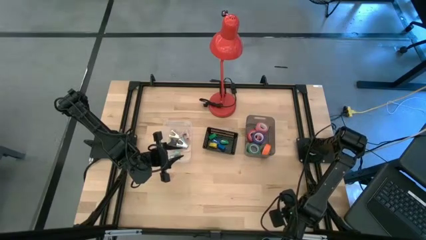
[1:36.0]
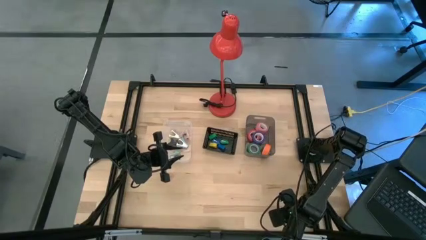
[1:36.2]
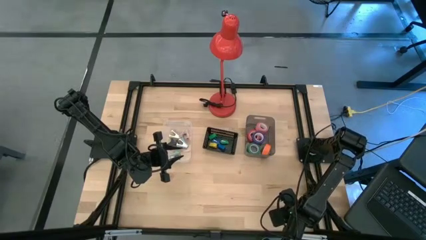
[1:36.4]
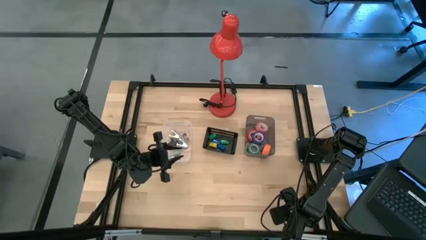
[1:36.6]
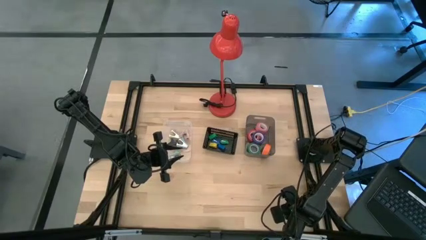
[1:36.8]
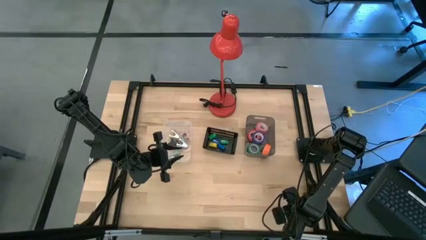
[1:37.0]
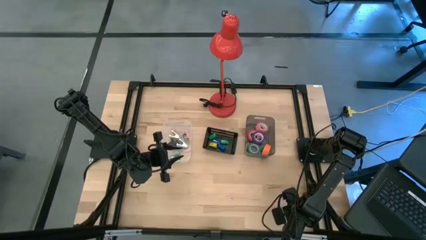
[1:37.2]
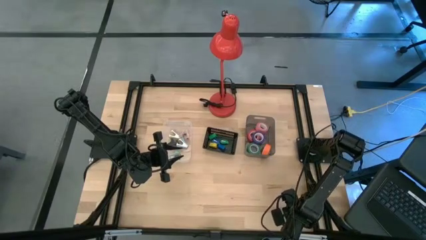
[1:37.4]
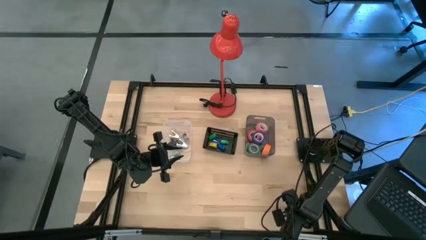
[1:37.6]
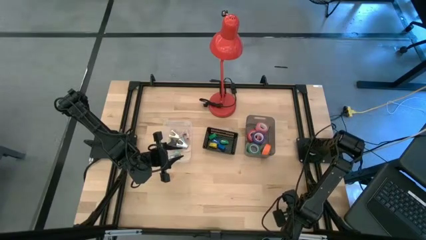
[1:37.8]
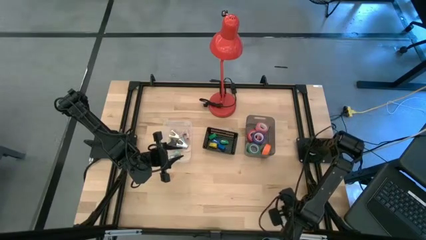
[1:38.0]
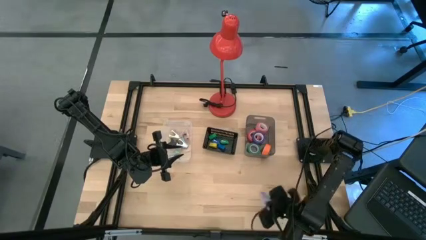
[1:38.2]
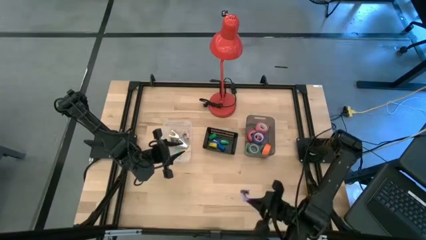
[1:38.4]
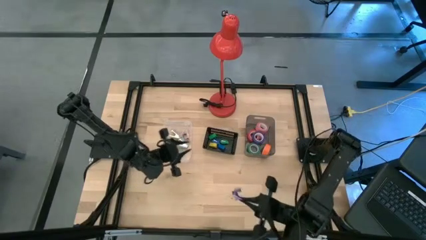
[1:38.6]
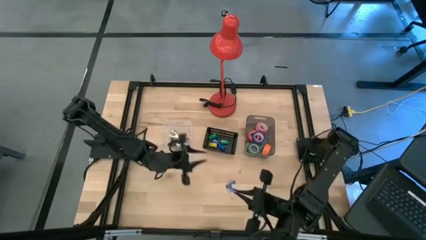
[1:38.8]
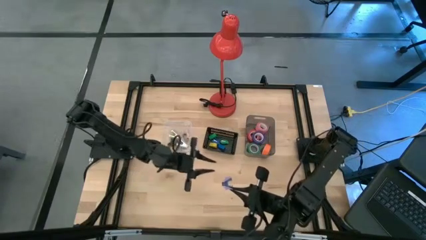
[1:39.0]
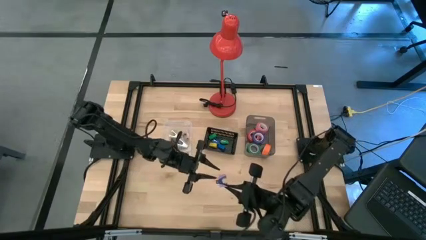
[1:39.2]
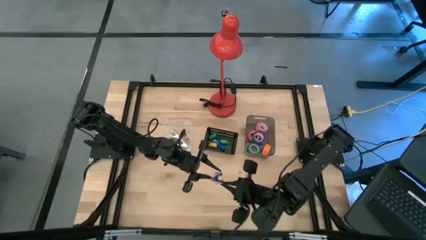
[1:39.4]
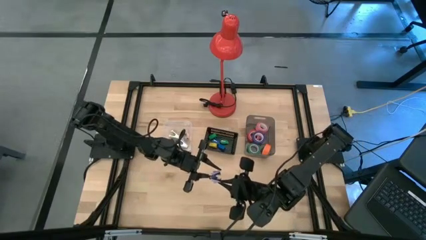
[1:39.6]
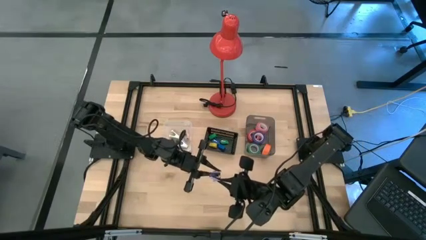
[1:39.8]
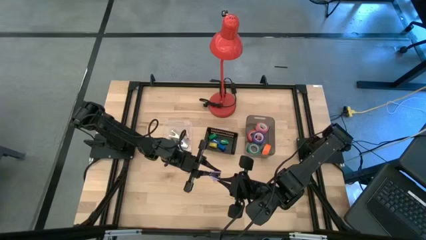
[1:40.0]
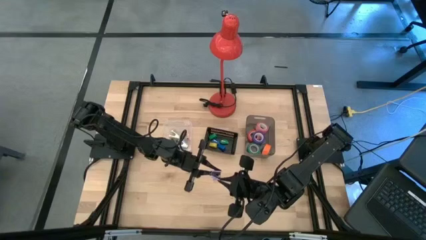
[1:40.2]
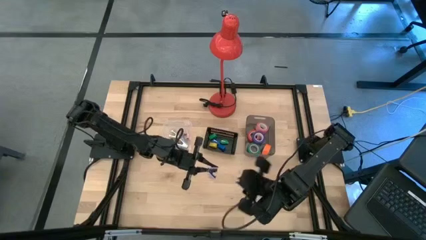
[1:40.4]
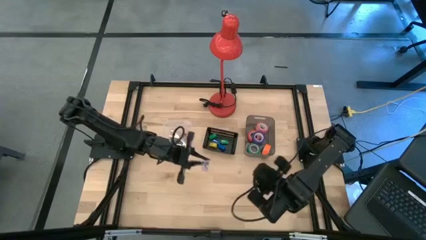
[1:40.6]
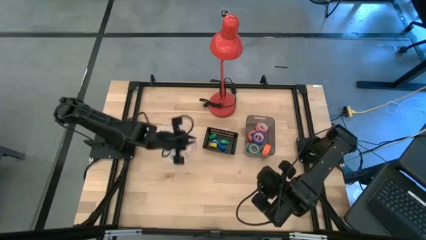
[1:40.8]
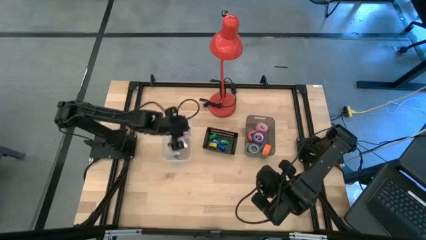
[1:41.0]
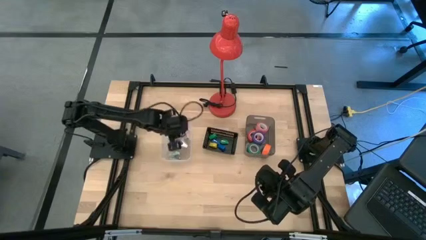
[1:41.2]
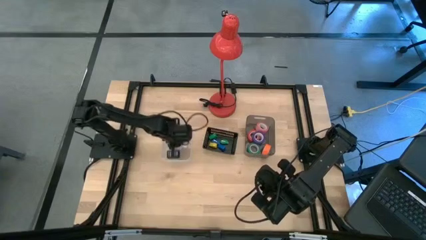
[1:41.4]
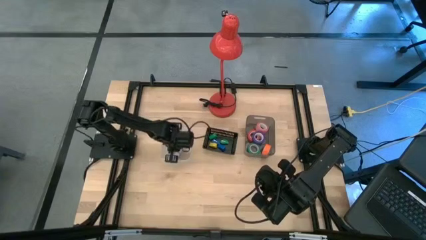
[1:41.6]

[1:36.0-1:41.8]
Task: Pick and place Stapler, Stapler remover, tape
Put the purple staple remover into the transparent bin

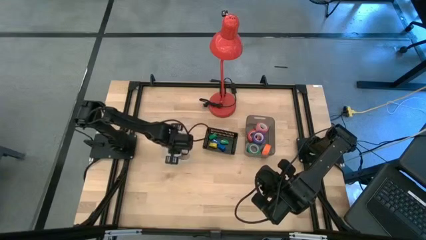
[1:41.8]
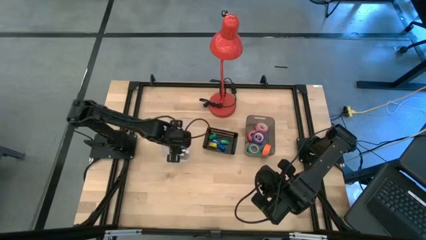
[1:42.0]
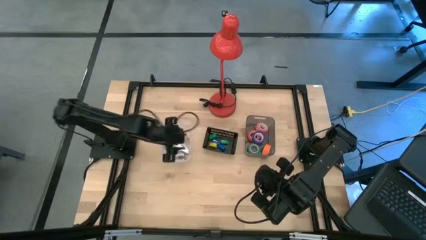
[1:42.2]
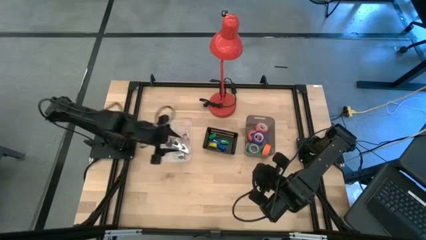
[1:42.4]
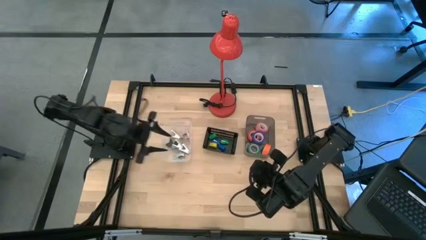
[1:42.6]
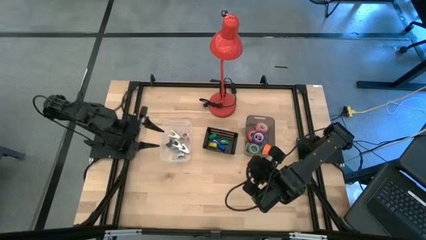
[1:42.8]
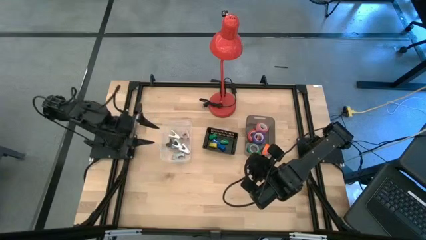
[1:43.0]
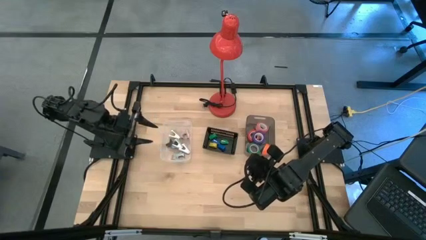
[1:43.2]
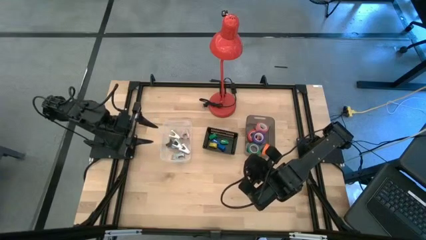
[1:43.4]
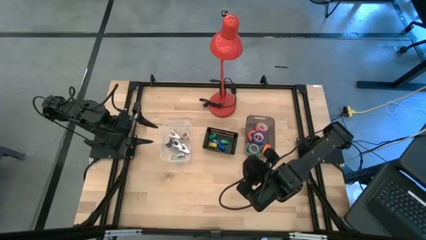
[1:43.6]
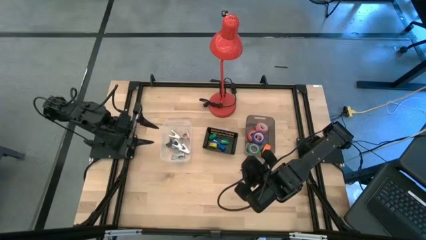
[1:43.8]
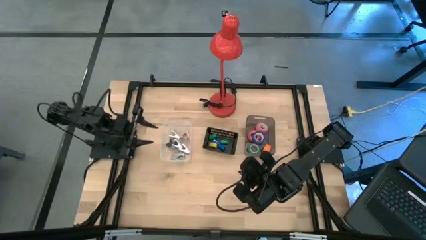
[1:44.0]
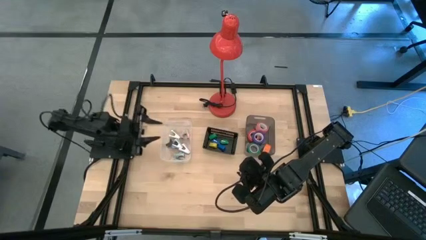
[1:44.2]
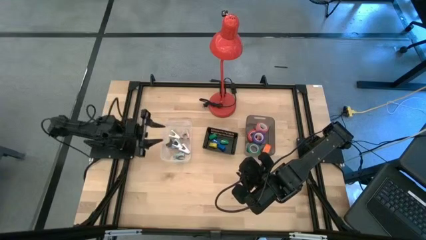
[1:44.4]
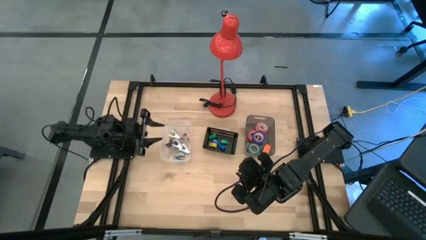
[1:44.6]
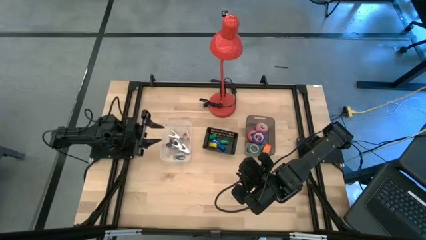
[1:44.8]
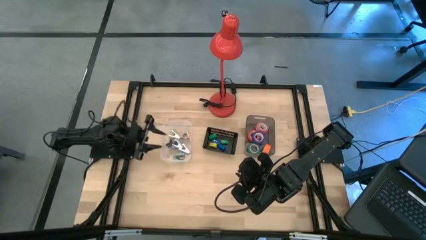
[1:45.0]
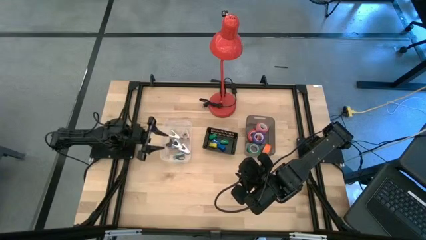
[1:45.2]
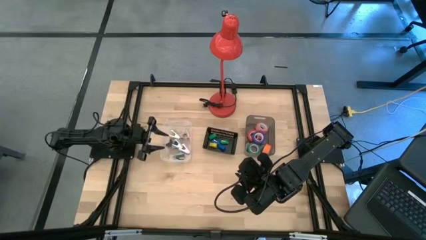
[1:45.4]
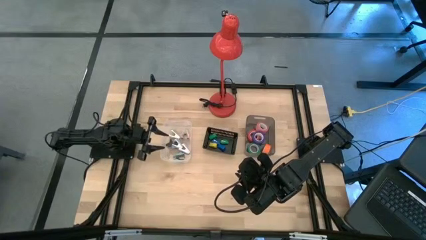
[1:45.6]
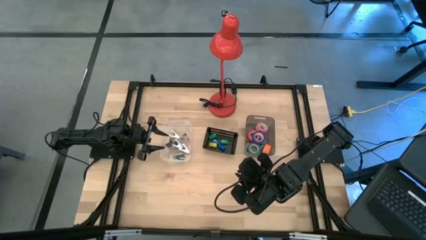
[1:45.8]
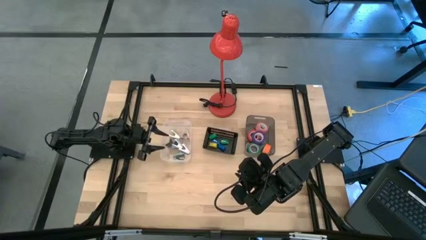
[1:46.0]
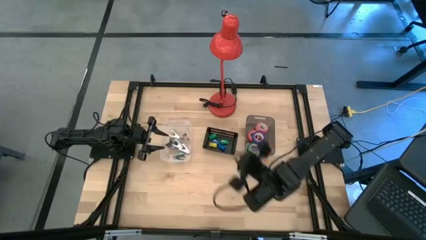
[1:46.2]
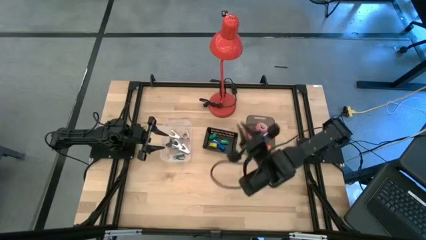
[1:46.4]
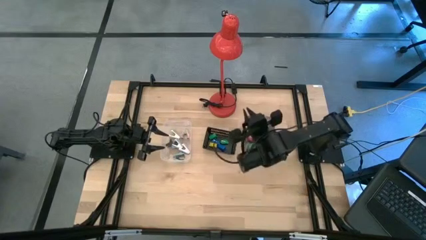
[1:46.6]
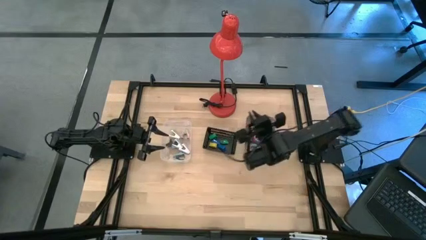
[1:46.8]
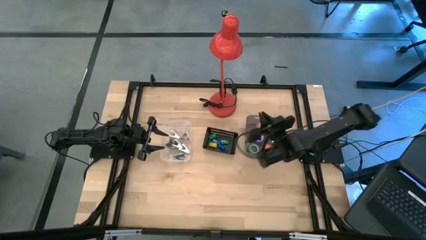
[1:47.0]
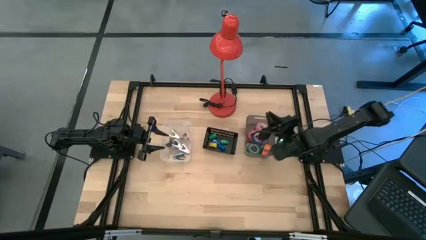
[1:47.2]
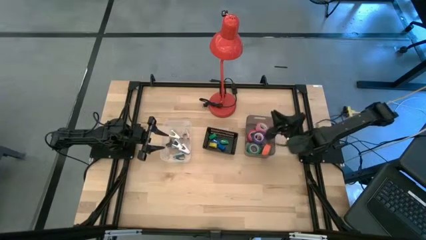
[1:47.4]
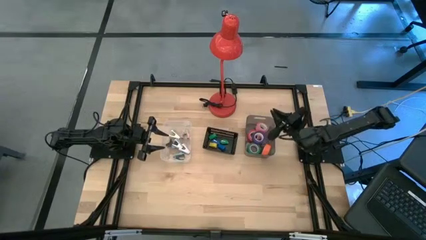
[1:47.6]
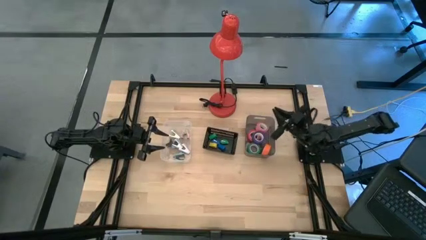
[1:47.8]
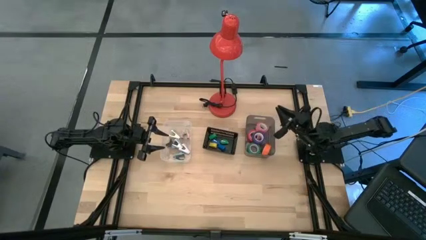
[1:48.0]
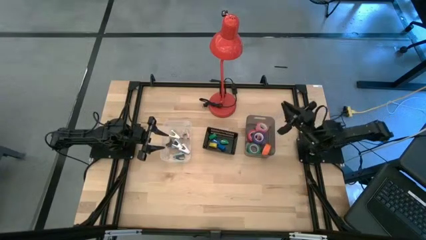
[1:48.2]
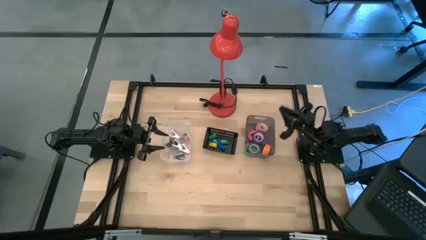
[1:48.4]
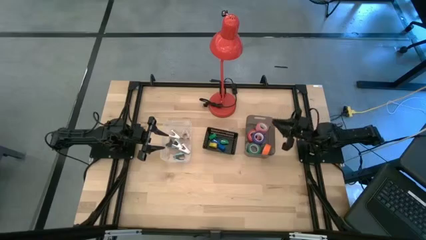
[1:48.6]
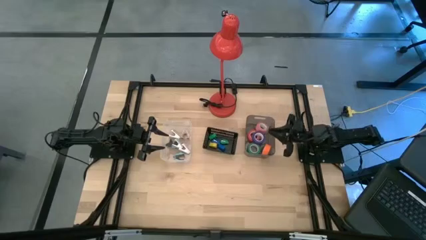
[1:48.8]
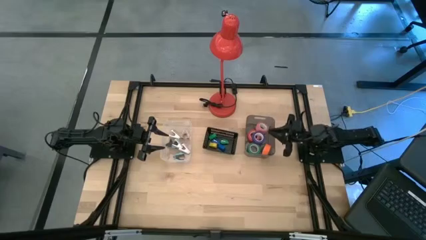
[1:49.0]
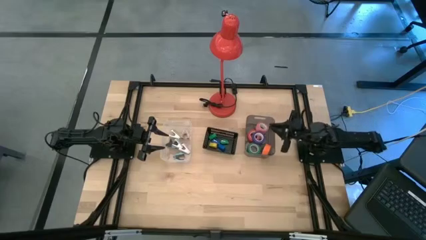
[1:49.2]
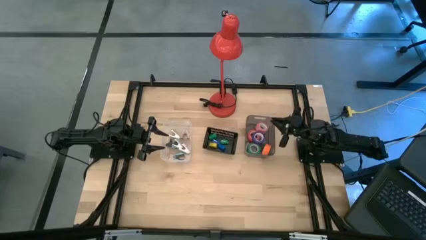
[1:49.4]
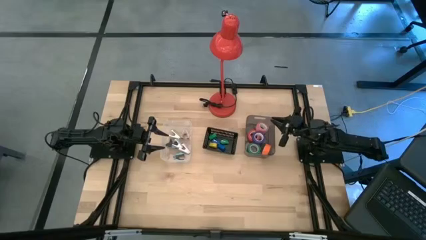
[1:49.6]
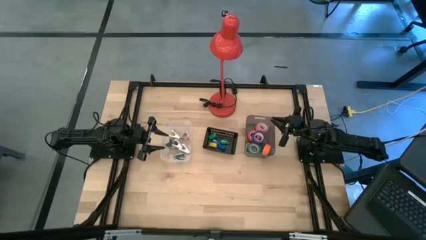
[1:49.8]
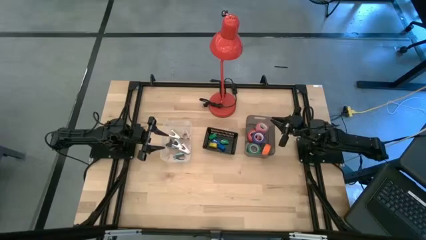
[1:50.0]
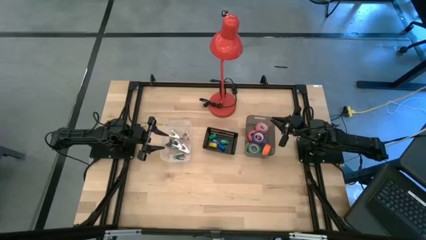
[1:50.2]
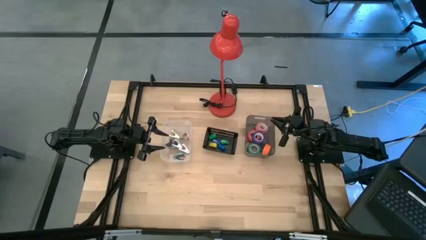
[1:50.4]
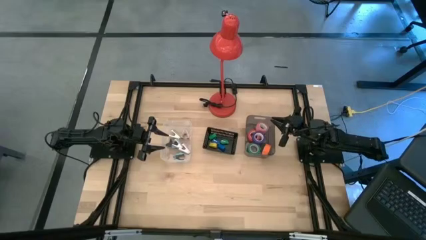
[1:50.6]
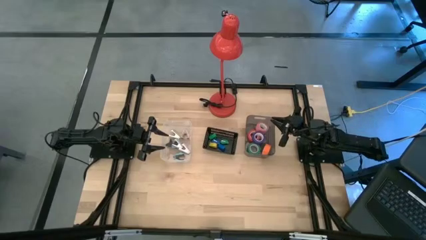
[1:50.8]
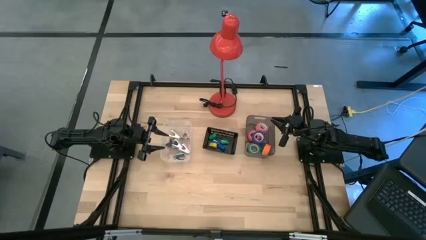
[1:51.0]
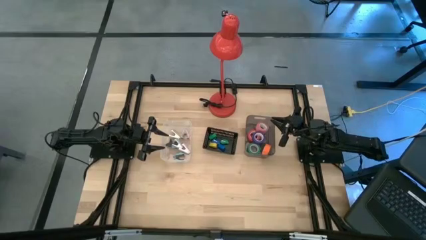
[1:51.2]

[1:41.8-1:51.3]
Return to Home Position
